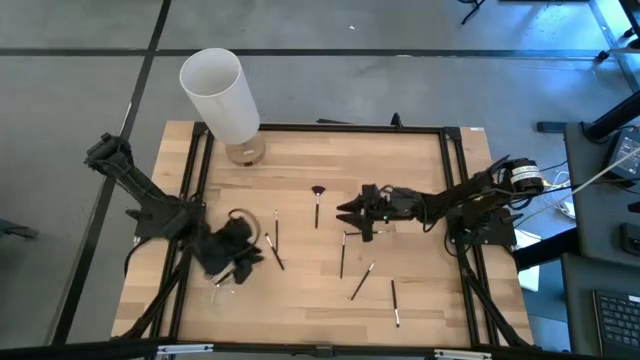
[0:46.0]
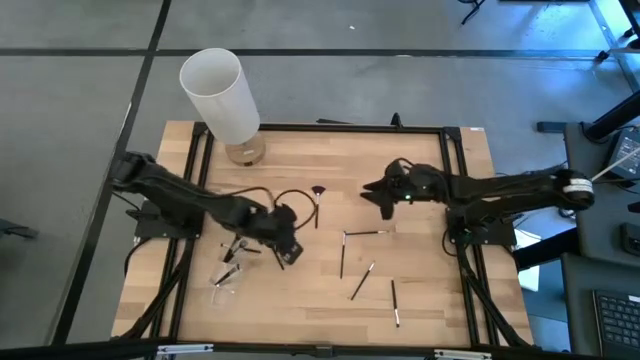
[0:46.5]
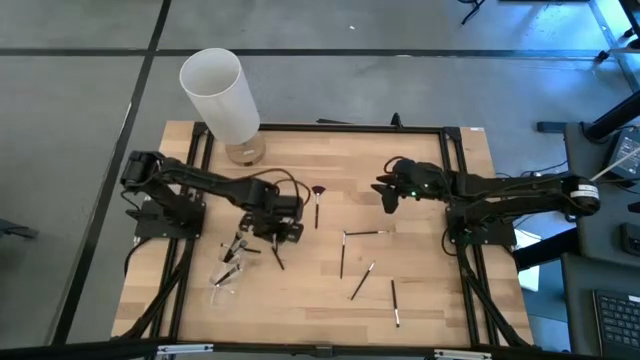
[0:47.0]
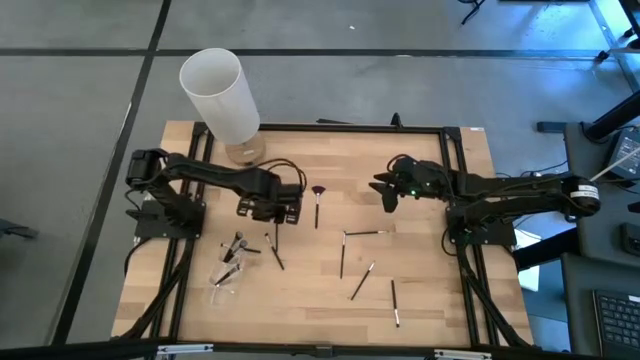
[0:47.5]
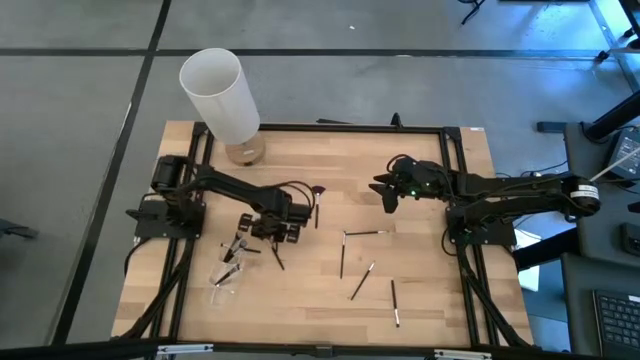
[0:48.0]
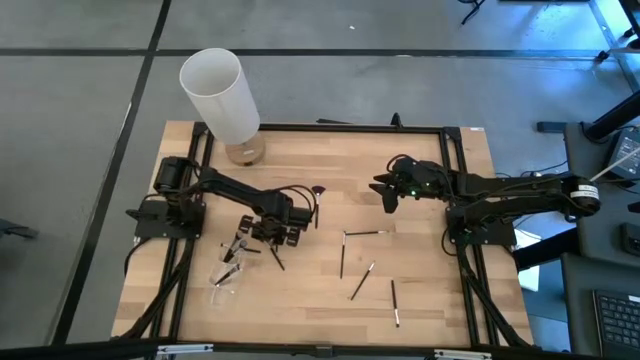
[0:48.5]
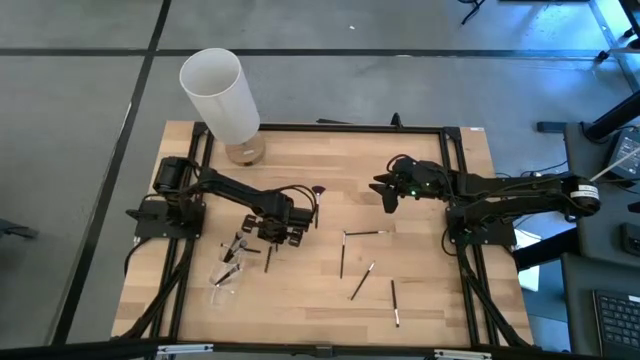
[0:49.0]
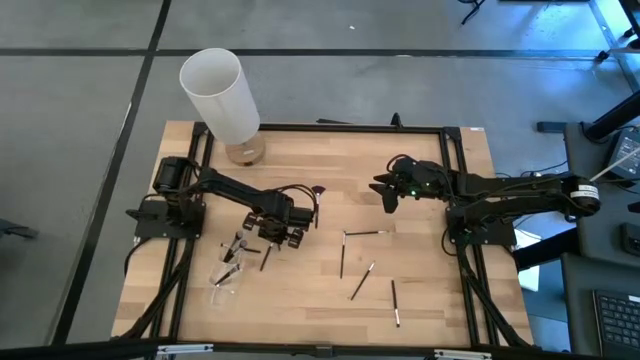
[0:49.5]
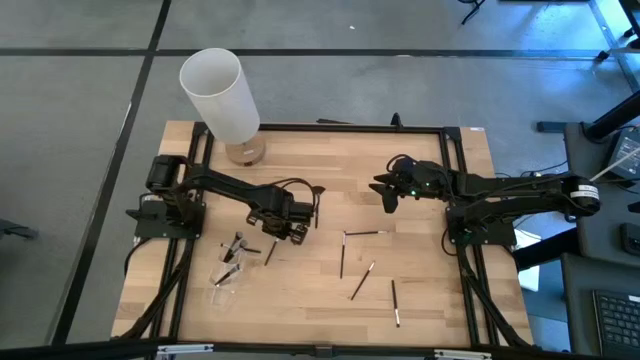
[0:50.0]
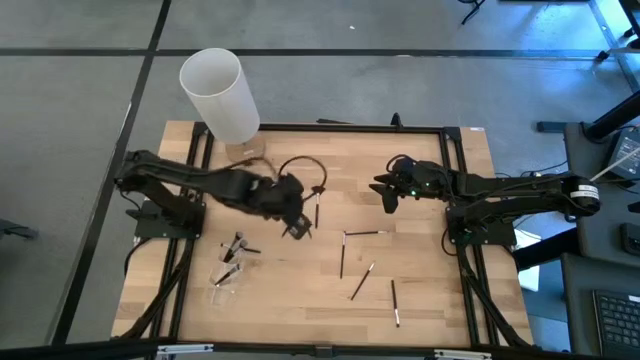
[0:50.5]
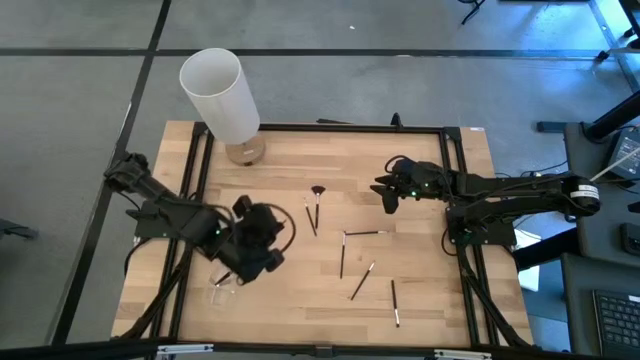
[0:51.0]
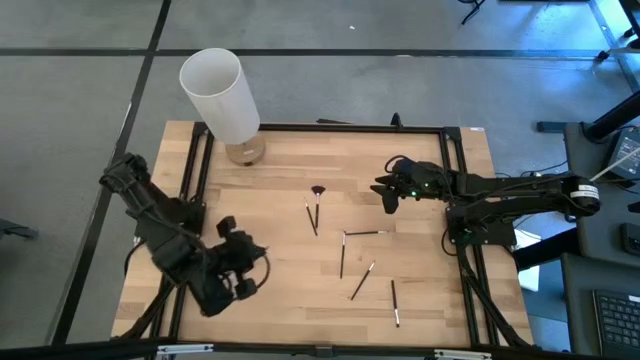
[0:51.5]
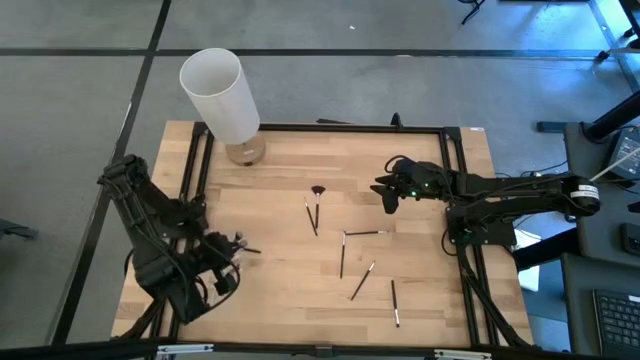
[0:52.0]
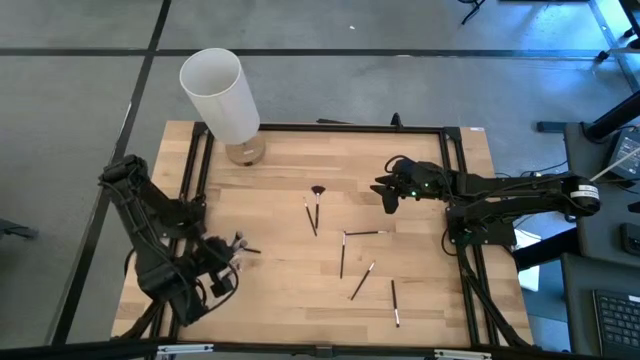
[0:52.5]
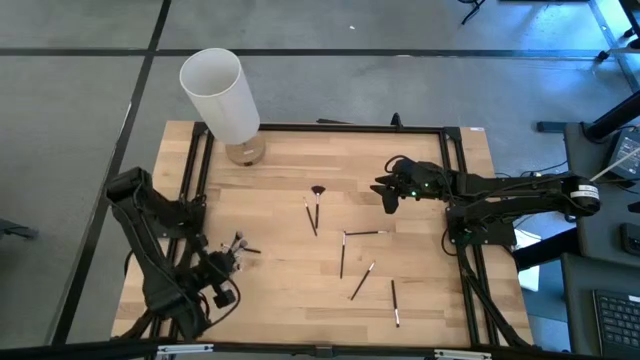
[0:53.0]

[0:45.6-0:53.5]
Task: Put items in baskets/containers
Put the black eyeshadow brush into the transparent organizer

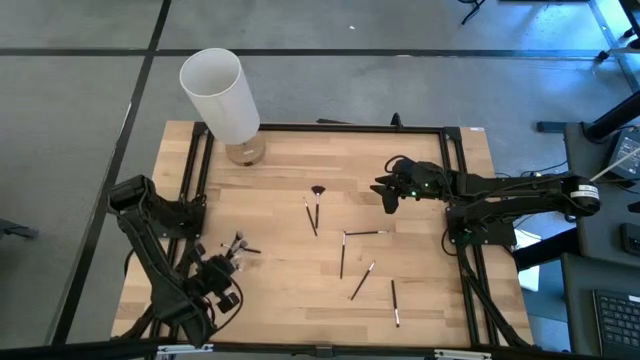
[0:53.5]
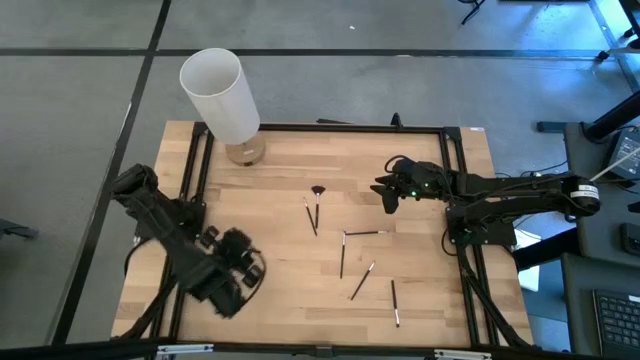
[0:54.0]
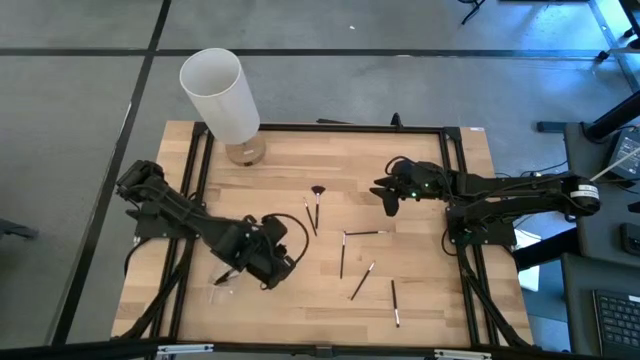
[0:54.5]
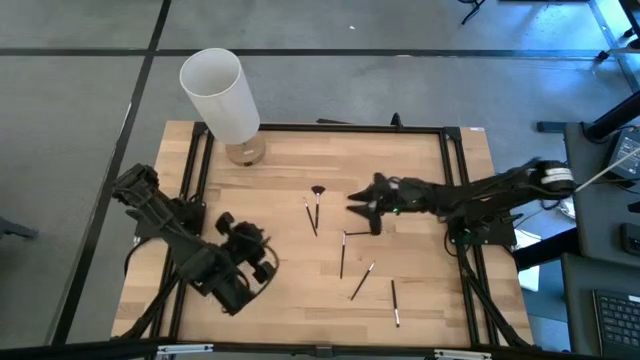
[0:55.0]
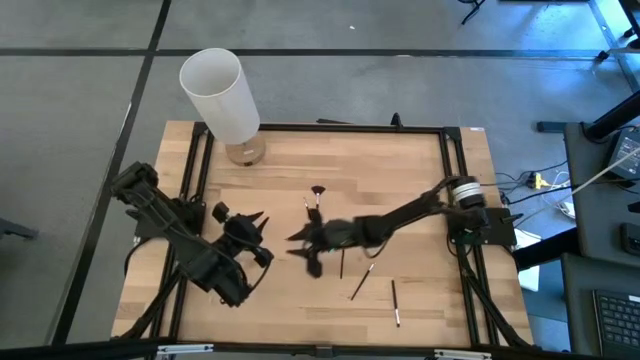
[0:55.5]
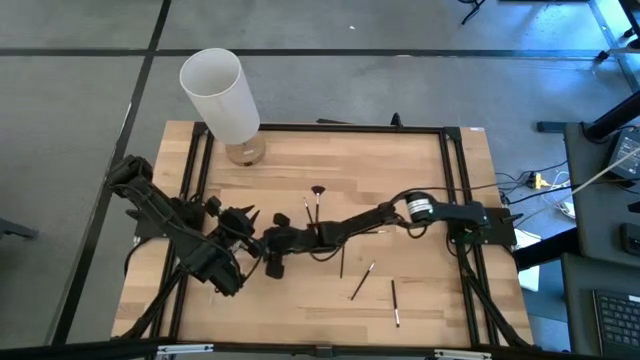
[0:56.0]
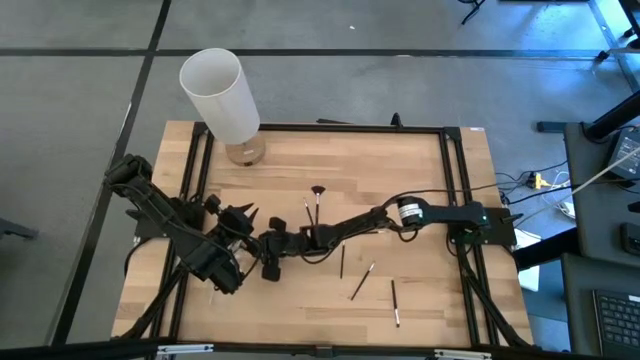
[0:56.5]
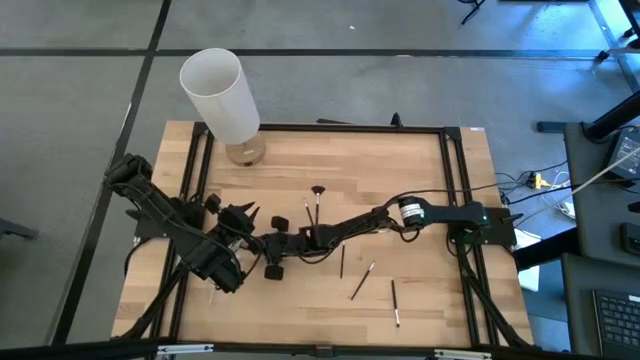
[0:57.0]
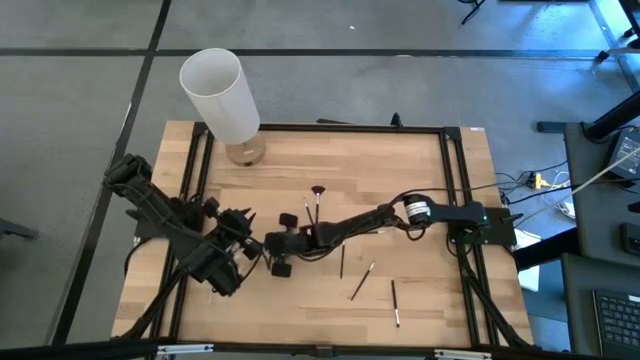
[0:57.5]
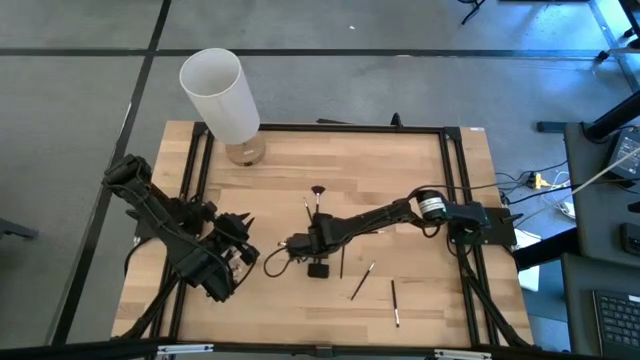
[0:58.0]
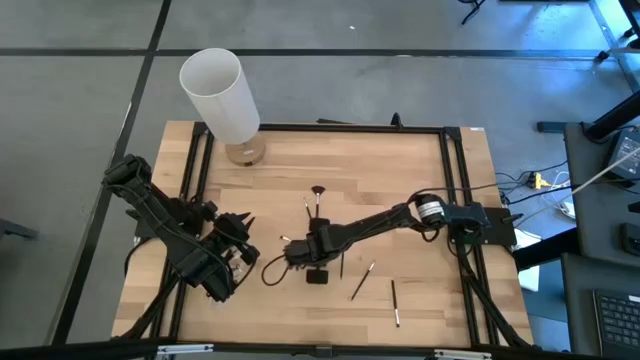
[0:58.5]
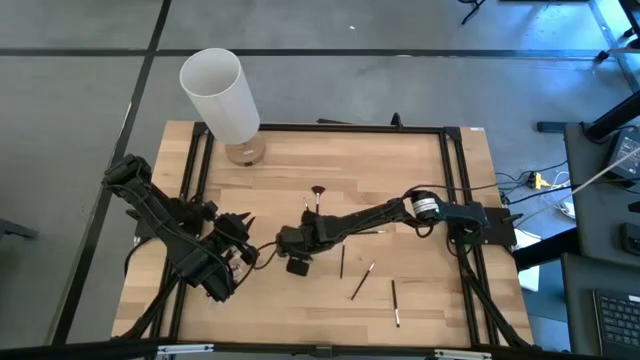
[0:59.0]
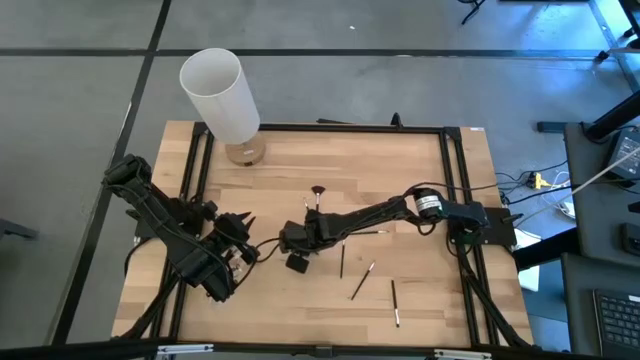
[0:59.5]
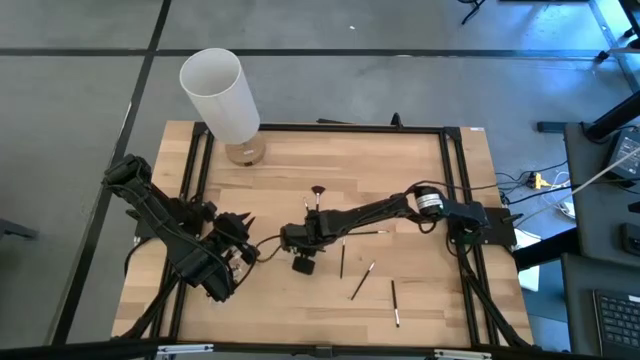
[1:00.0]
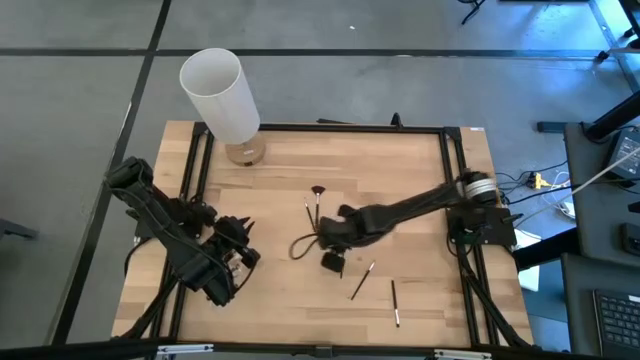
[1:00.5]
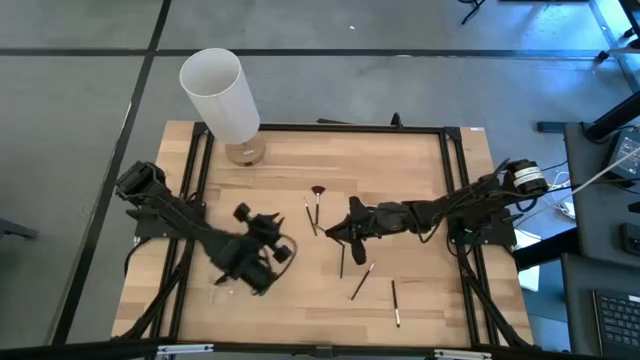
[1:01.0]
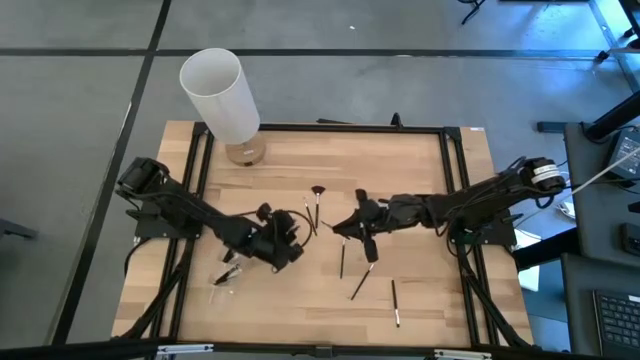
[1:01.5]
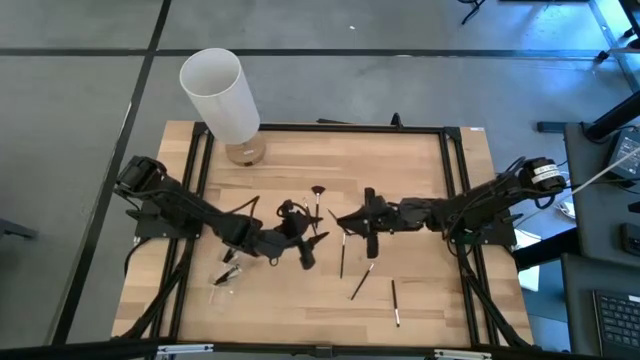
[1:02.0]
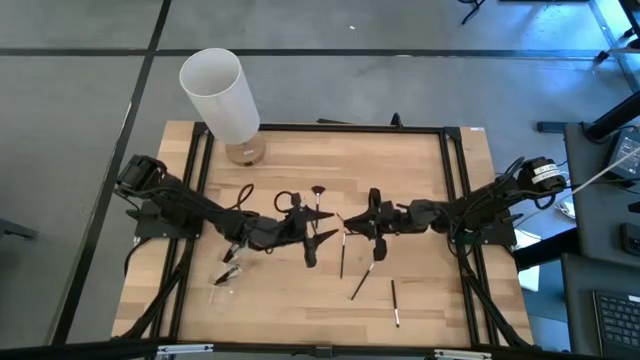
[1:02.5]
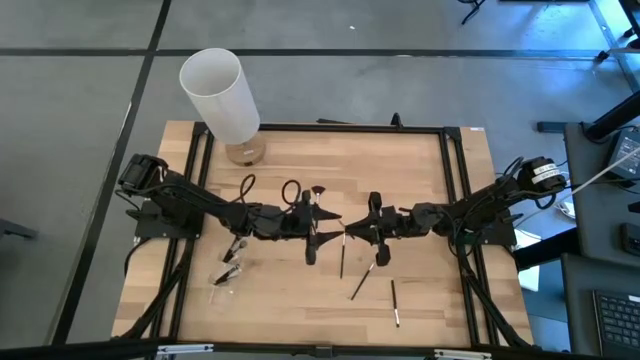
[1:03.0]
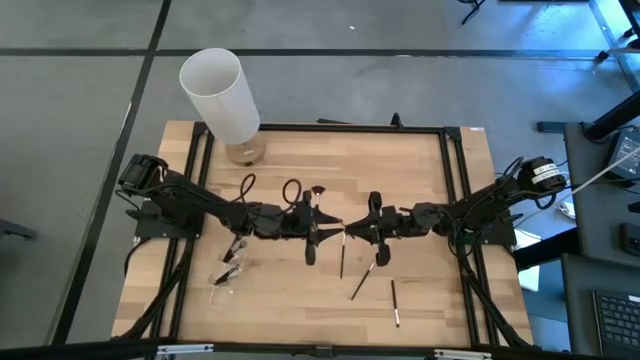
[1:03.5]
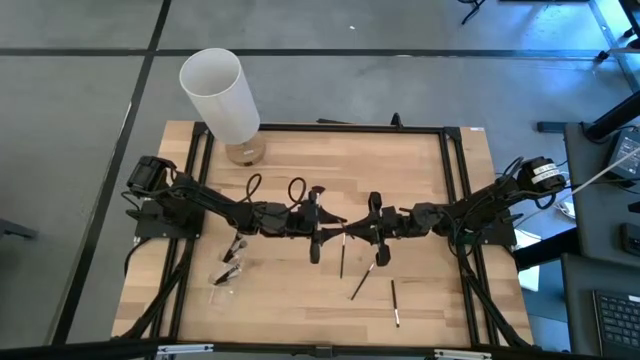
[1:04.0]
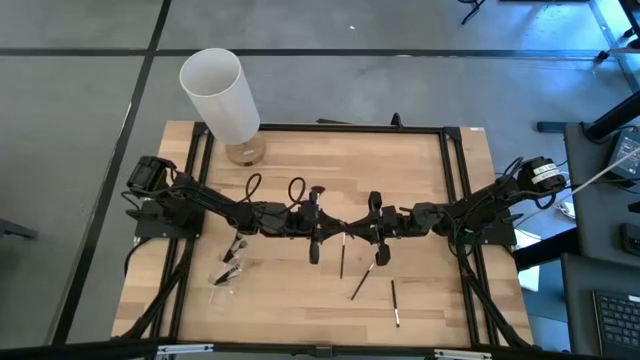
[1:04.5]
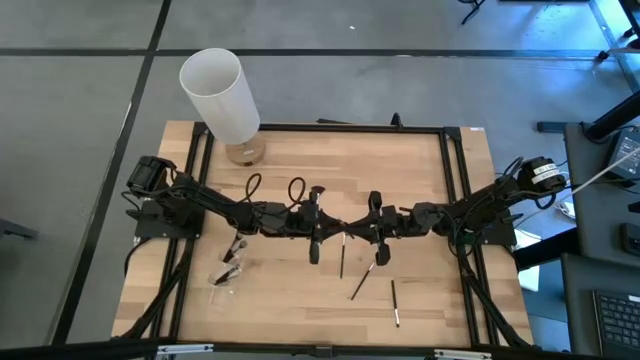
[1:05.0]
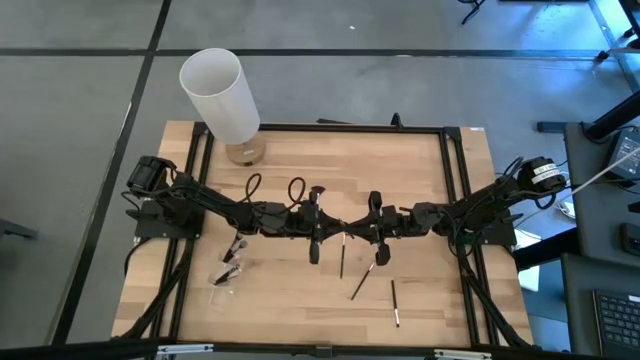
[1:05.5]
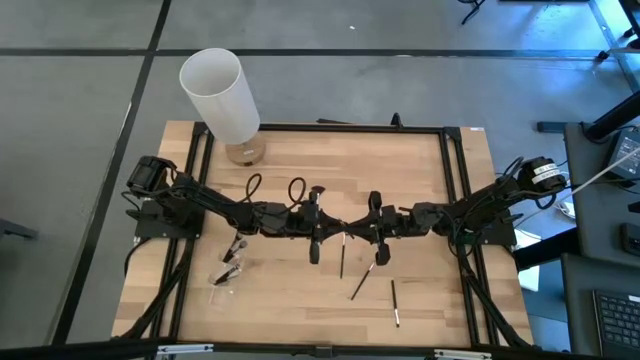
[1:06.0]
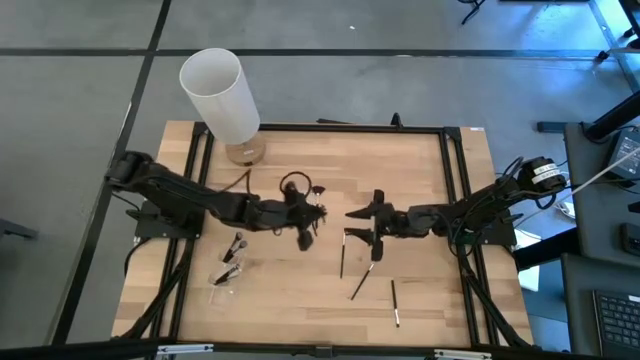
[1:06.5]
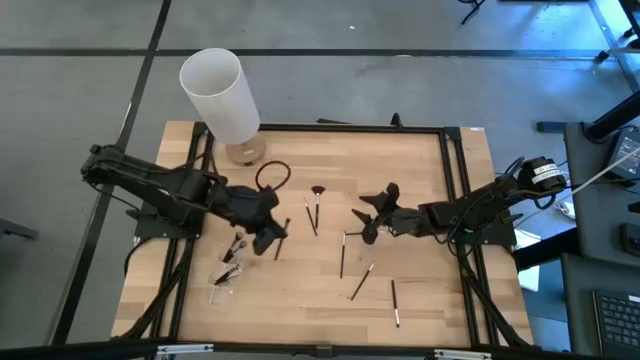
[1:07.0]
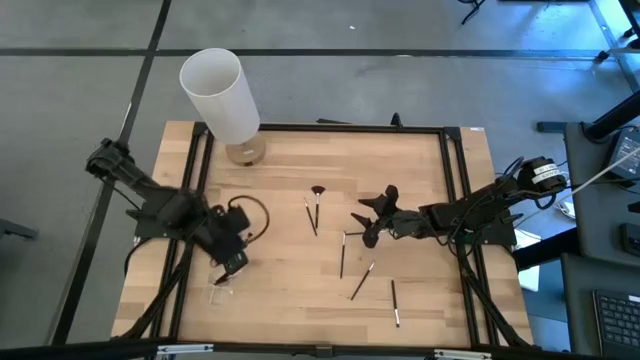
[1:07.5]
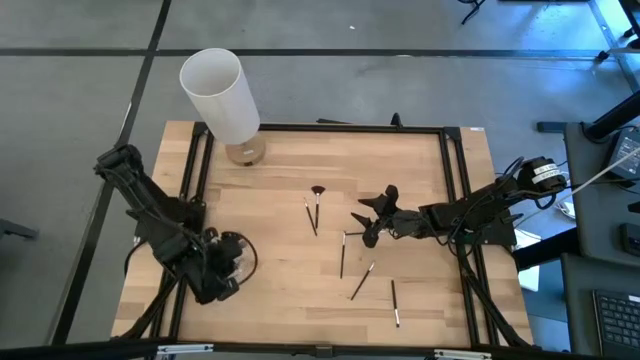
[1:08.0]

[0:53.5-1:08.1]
Put the black eyeshadow brush into the transparent organizer
